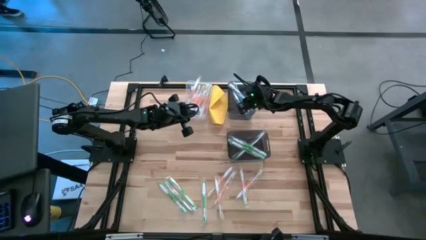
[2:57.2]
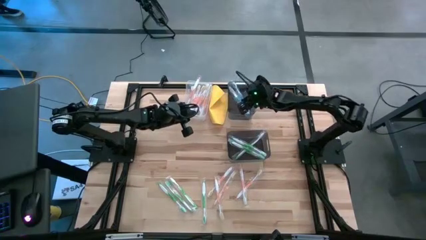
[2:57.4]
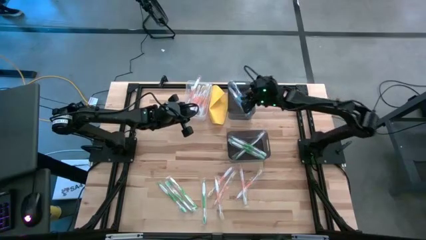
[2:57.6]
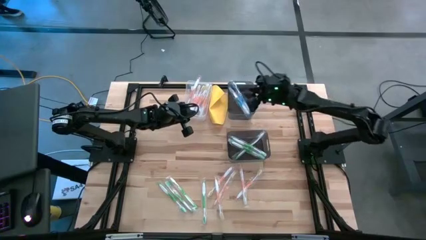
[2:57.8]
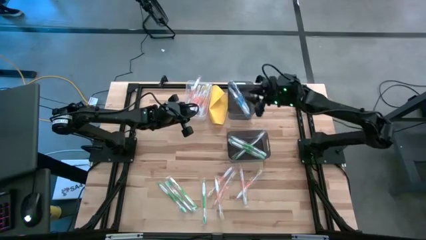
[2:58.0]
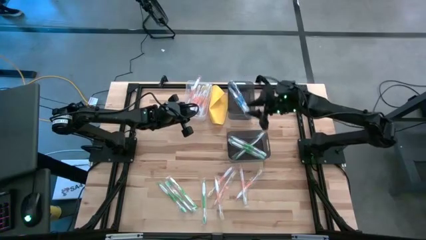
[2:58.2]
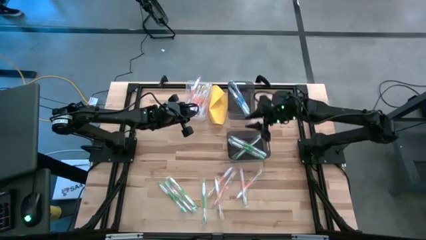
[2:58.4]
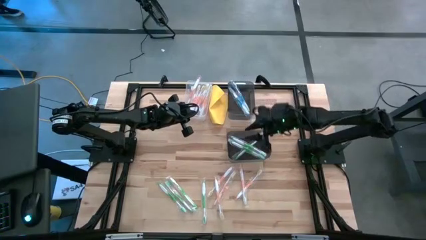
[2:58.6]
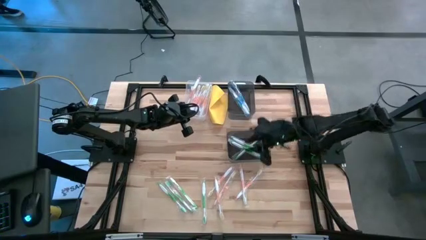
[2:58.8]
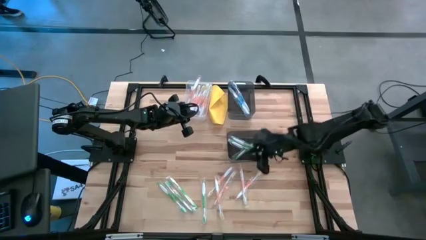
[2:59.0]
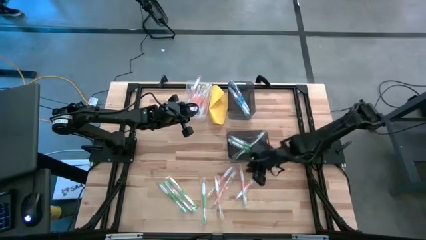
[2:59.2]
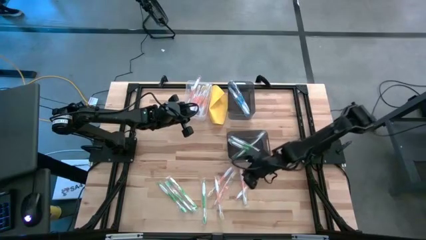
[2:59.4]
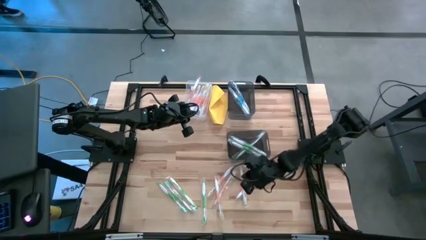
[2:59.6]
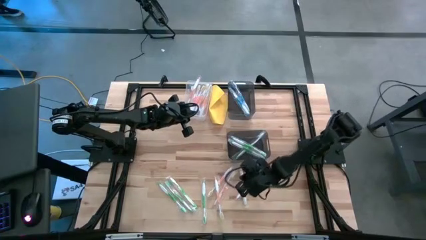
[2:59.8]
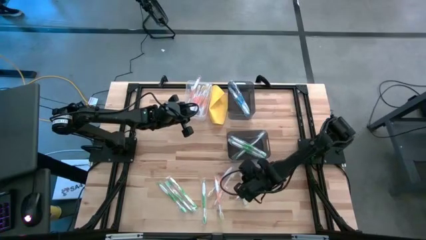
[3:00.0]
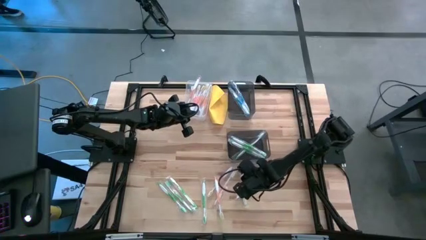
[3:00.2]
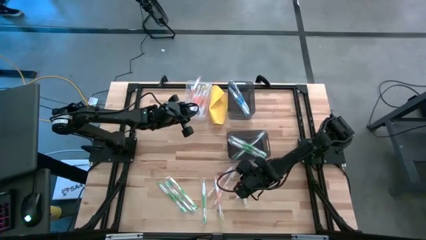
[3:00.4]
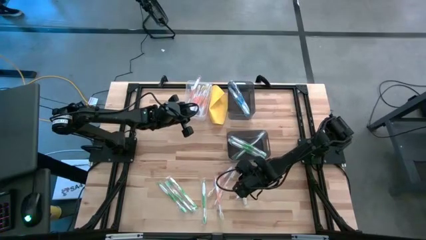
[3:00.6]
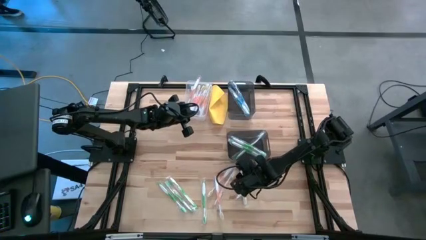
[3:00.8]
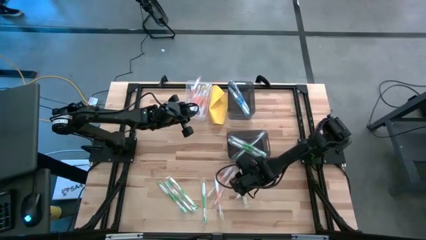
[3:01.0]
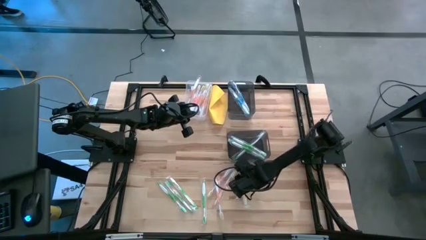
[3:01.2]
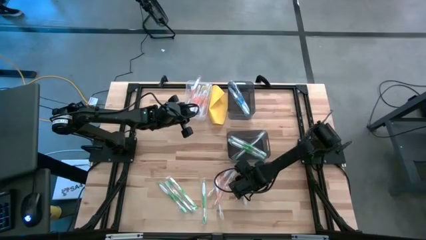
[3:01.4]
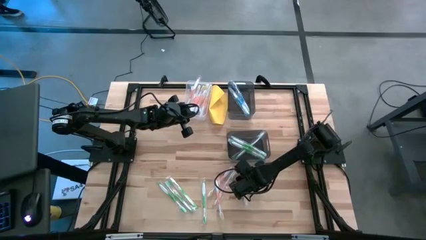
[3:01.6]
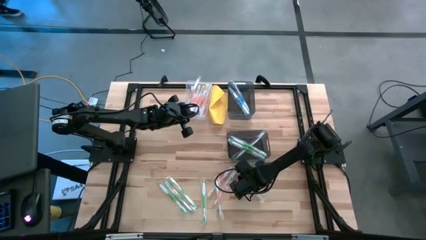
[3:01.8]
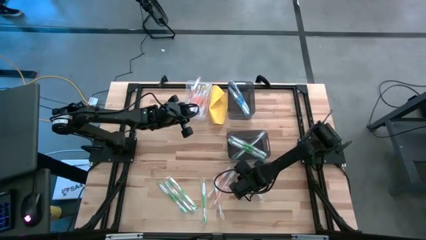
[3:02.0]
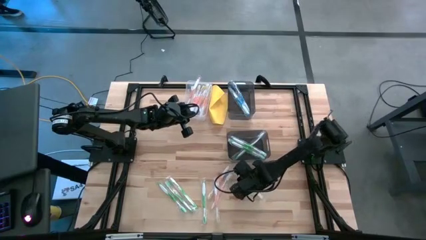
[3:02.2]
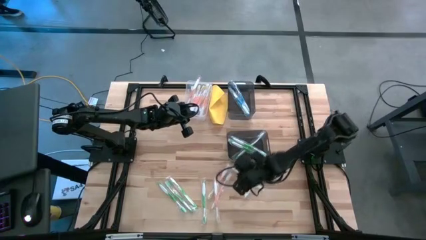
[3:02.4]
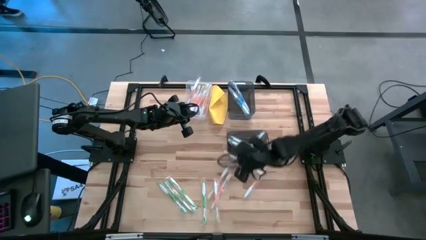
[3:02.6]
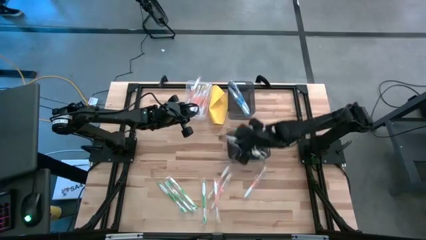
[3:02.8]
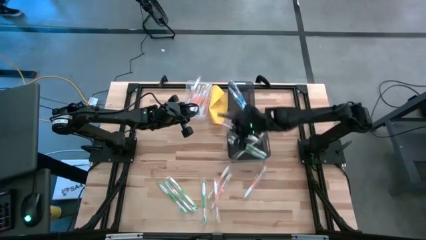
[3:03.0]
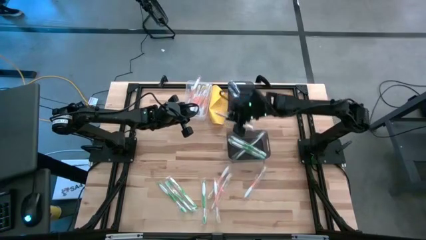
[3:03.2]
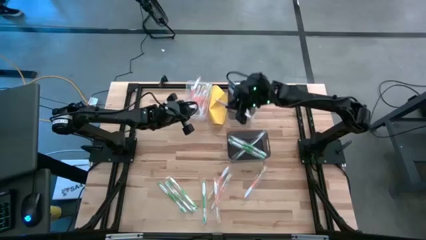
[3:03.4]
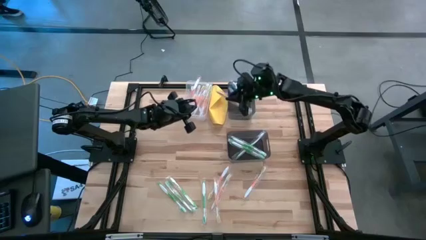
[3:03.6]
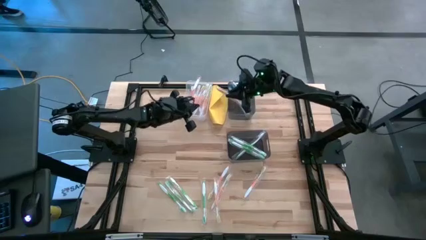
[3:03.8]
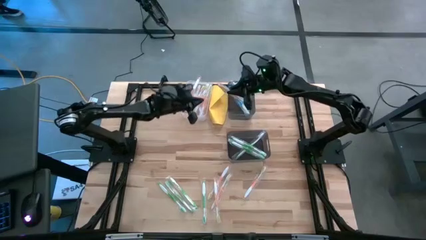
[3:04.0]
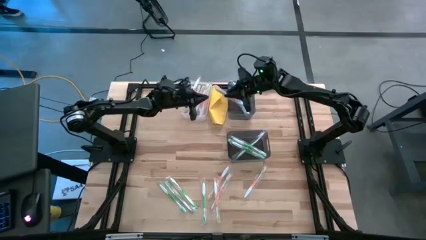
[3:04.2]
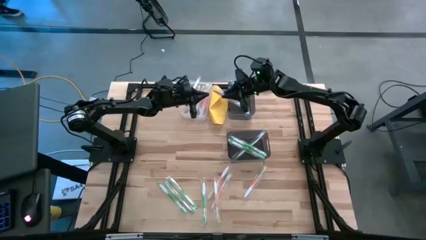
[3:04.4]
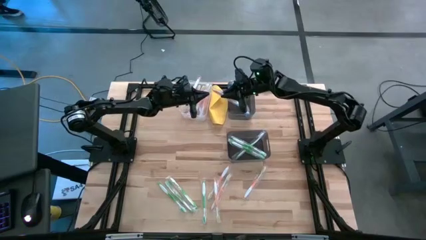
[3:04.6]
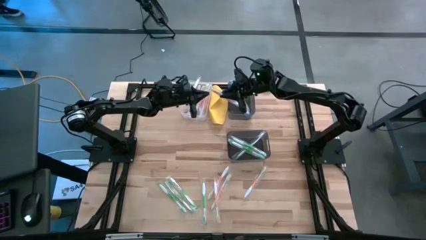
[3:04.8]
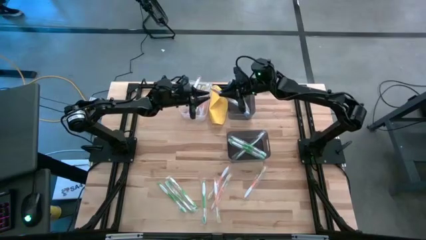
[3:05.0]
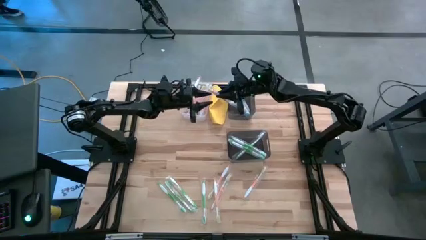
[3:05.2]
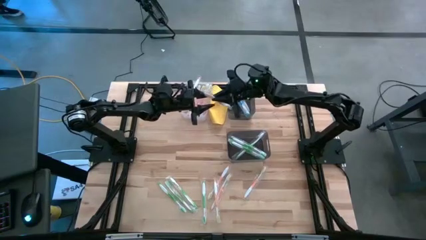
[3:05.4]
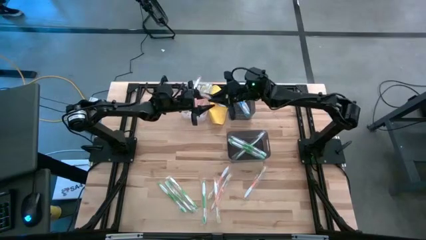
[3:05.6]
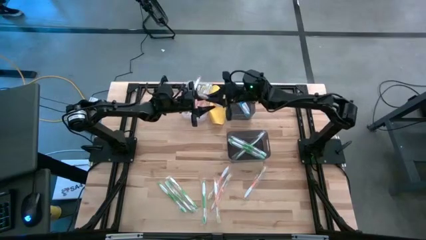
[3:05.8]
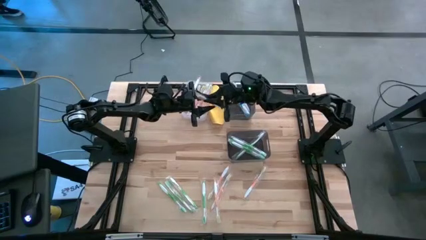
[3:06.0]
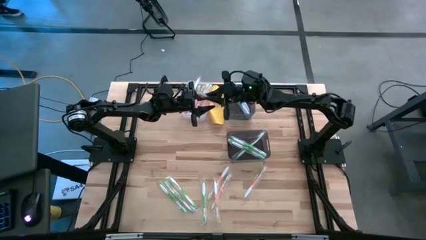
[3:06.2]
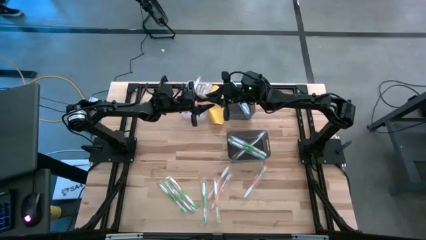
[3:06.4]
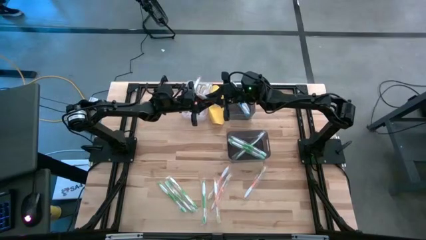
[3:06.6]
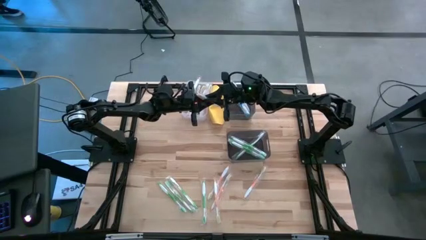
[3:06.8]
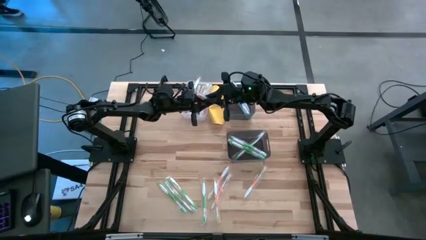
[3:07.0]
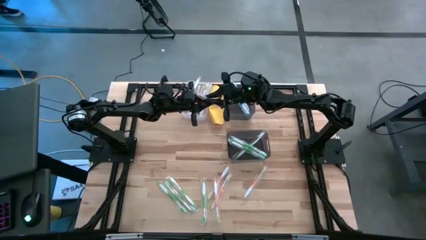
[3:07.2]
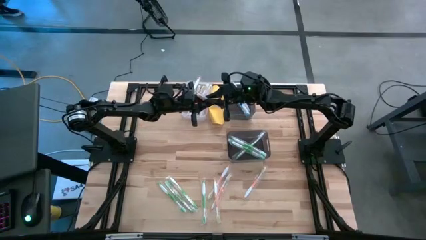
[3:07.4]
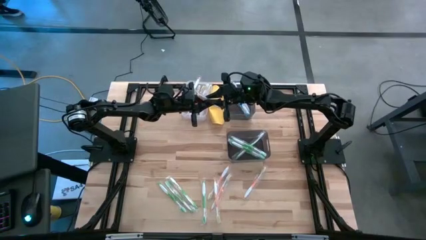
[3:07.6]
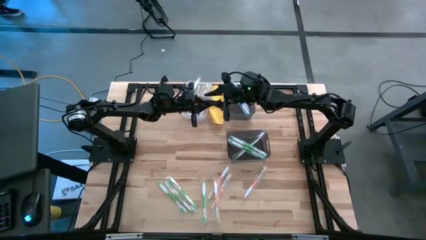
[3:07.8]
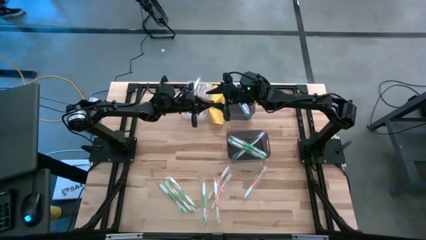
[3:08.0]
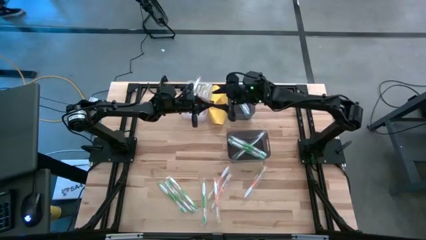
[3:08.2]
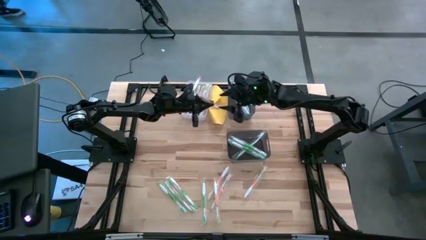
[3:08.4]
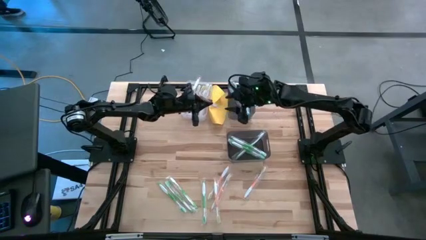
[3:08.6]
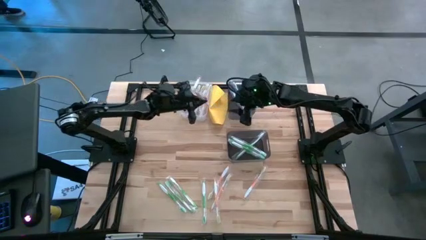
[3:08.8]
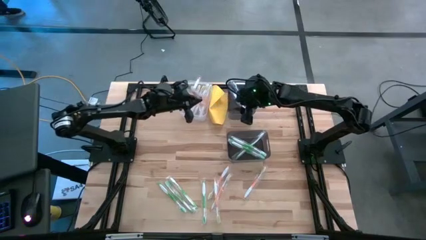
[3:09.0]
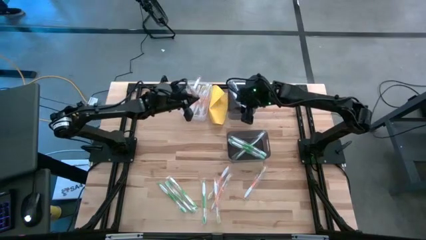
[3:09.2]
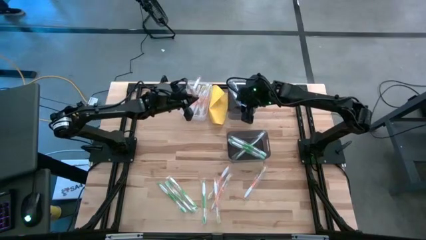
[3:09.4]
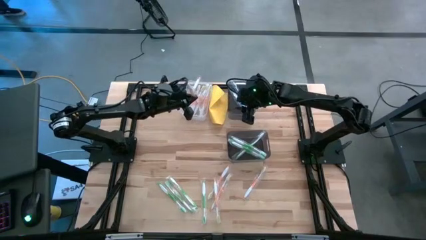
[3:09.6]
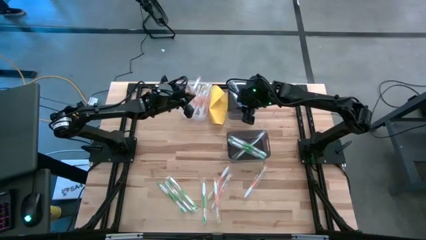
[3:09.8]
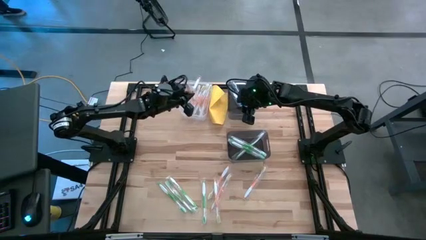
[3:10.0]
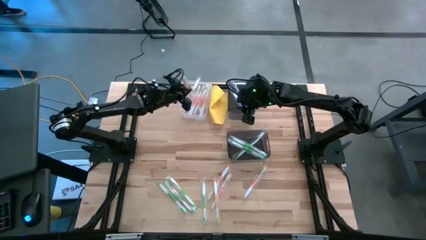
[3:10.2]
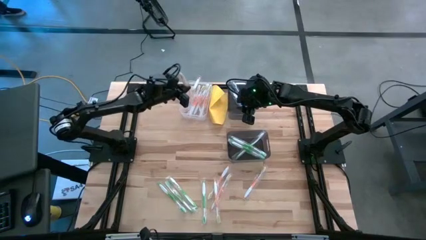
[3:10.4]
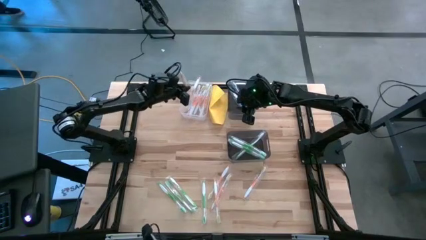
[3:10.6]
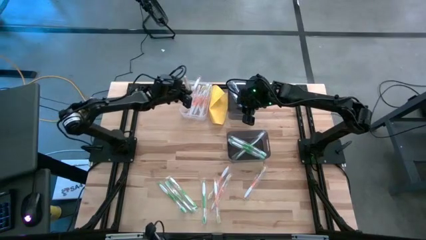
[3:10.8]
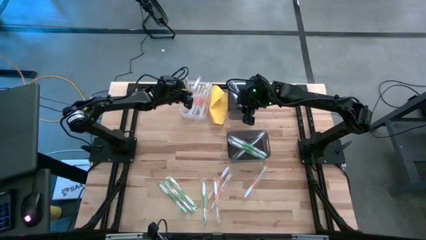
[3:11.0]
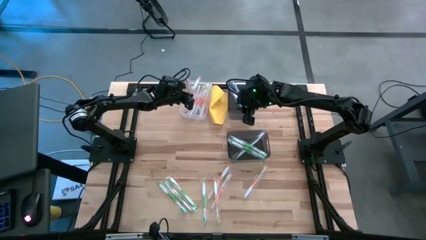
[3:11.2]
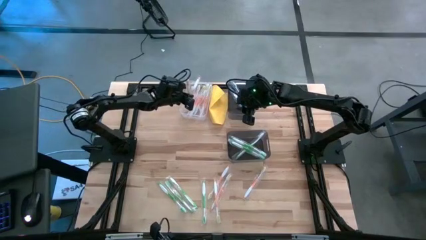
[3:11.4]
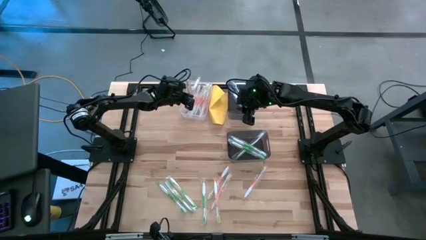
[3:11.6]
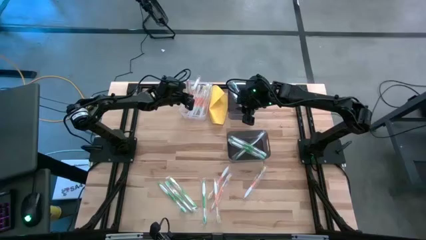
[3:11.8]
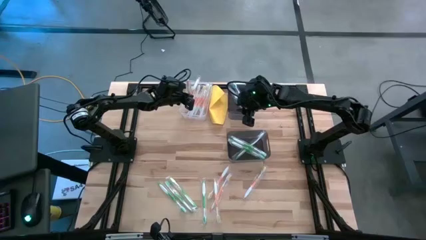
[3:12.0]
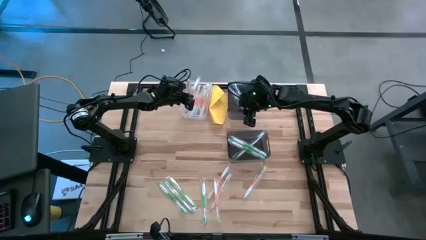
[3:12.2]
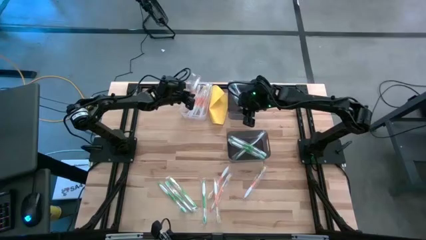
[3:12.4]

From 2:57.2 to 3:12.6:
Task: Pick & Place Toothbrushes
Put the orange toothbrush into the transparent bin

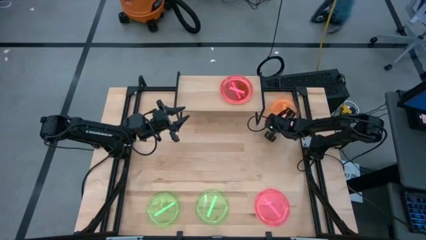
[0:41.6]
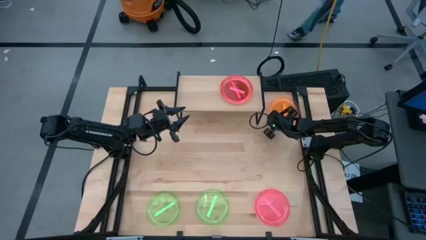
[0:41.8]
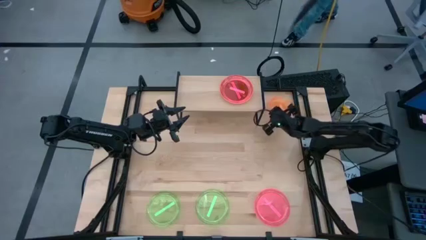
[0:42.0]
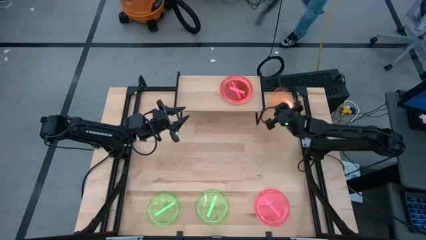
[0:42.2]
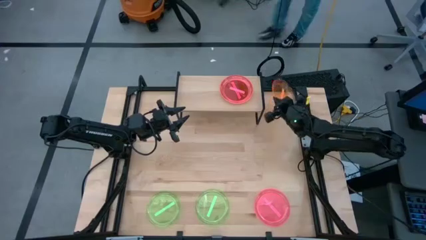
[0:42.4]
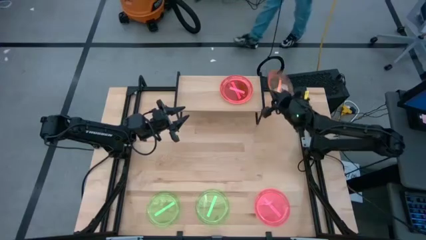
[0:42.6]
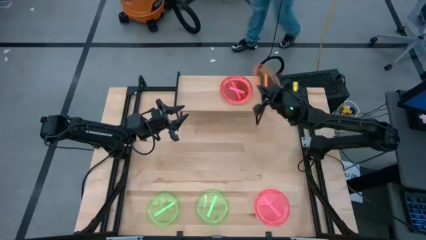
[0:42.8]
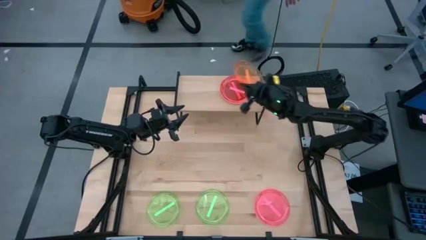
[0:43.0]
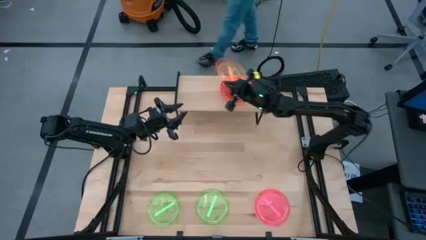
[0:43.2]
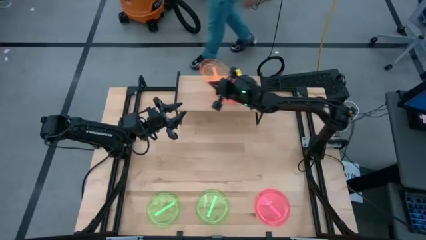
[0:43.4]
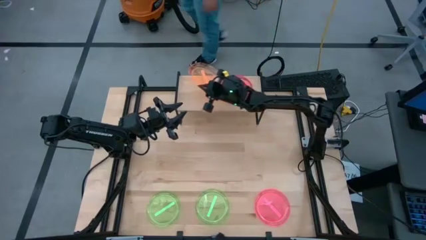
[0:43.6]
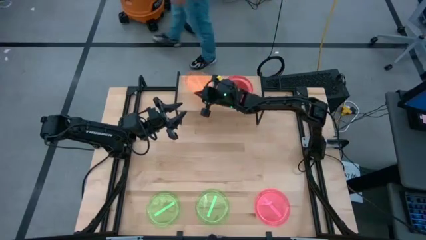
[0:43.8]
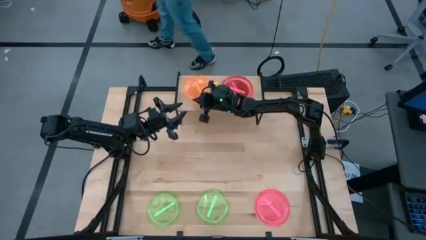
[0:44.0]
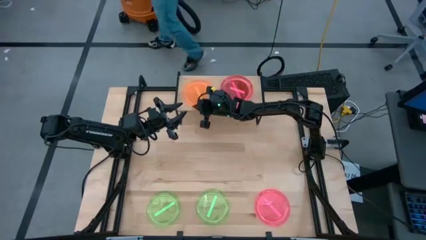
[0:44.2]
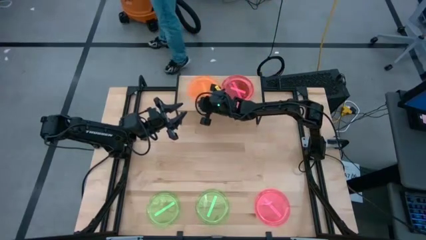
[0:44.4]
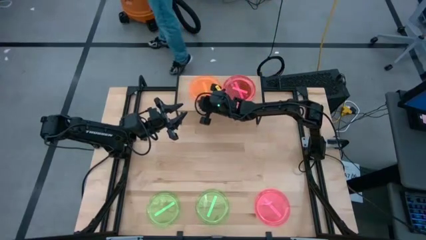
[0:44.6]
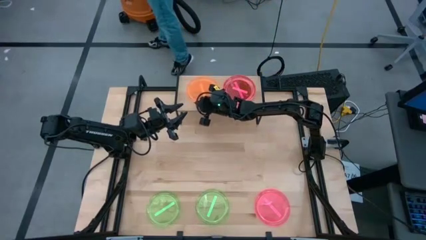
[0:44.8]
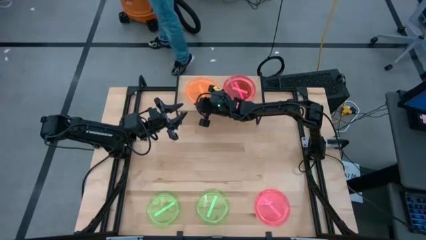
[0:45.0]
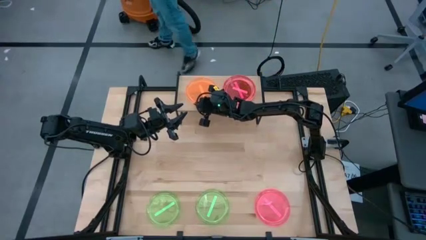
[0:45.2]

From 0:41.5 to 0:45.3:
Task: Place and stack plates onto a shelf
Put the orange plate on the shelf
